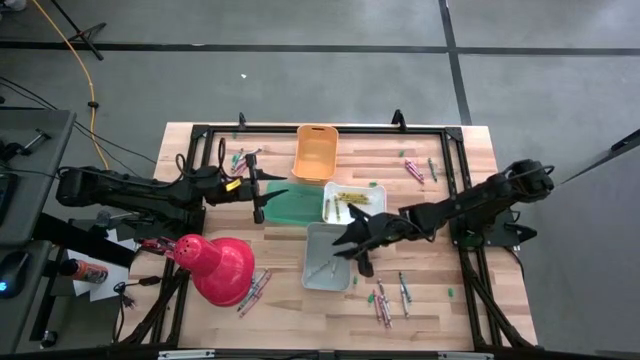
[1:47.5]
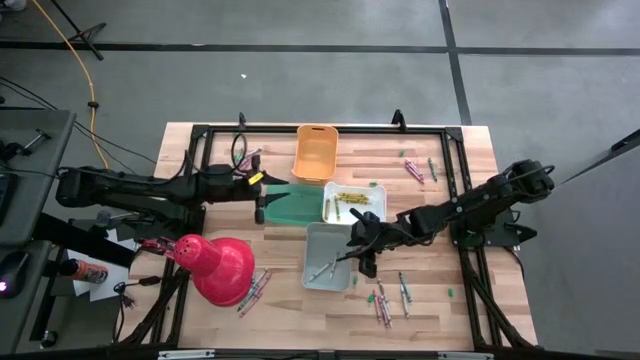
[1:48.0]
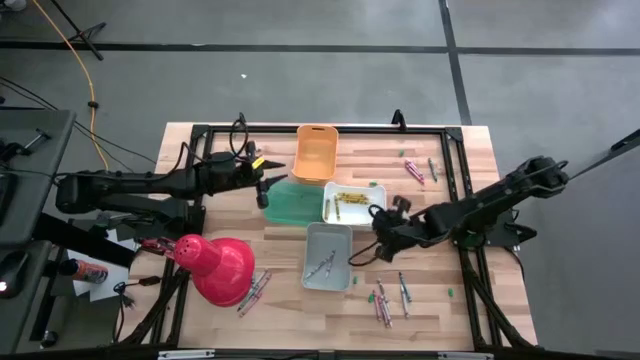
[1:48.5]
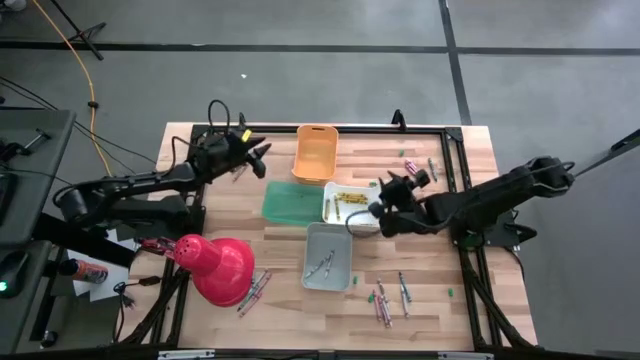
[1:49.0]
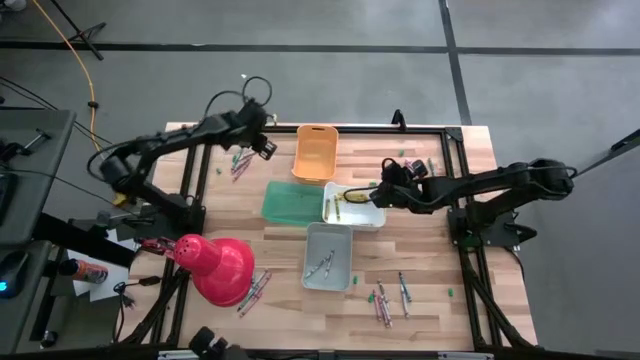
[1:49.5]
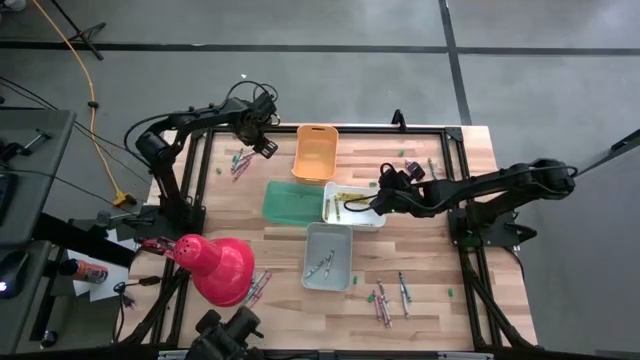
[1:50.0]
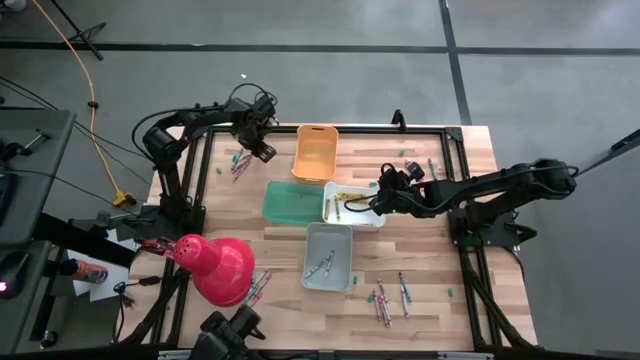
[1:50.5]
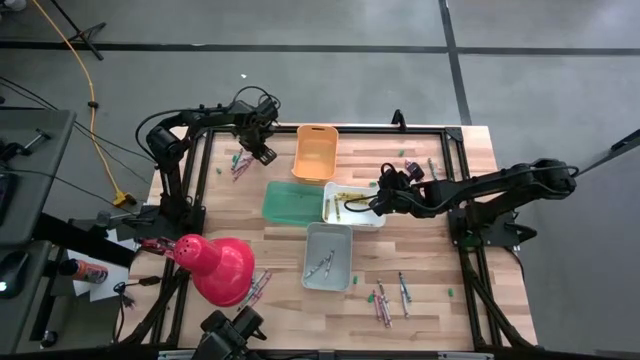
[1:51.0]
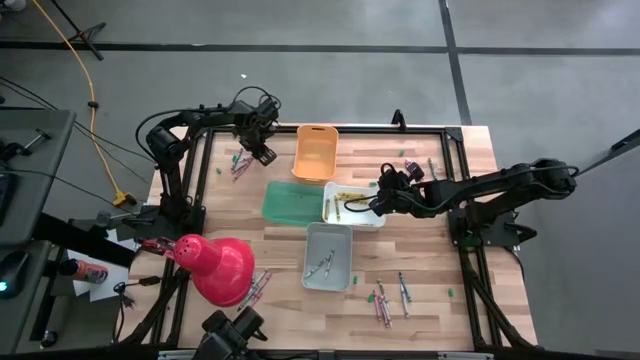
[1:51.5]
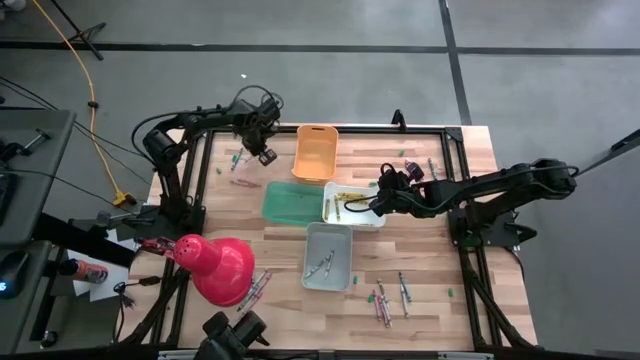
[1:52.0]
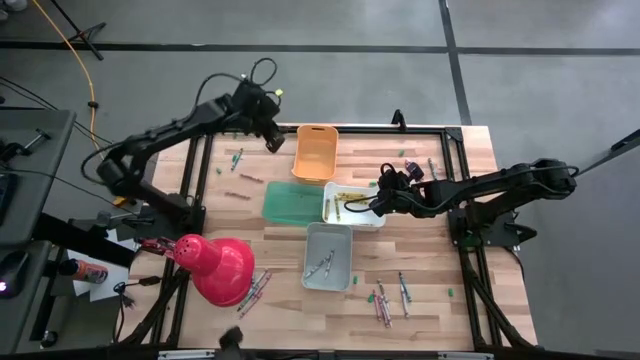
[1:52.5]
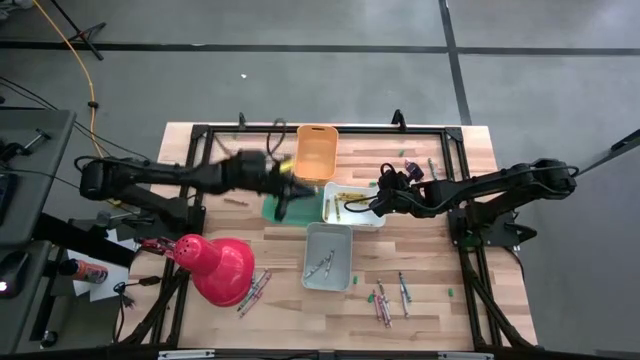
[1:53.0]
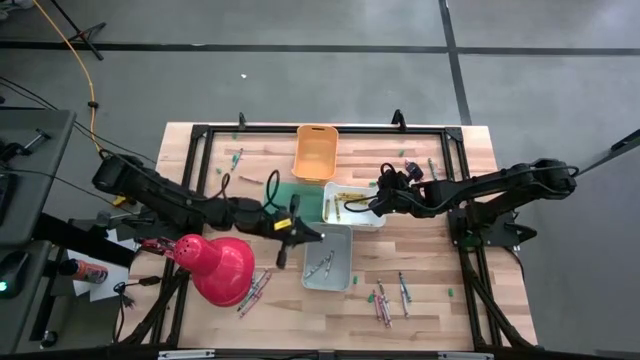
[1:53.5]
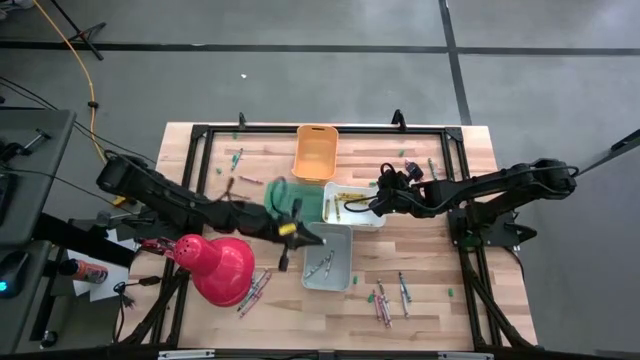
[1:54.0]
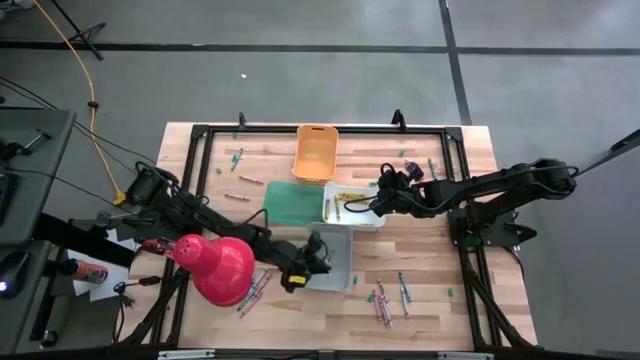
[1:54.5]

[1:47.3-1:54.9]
Task: Sort crayons
Put the white crayon into the gray bin

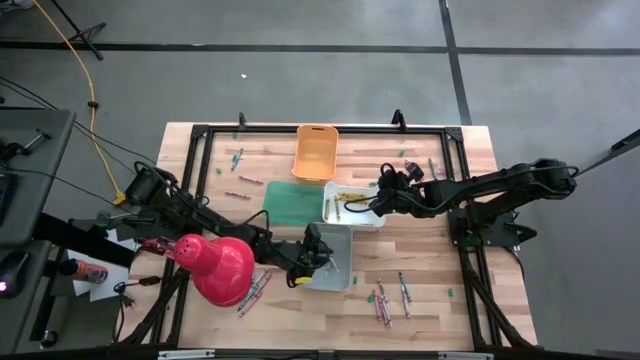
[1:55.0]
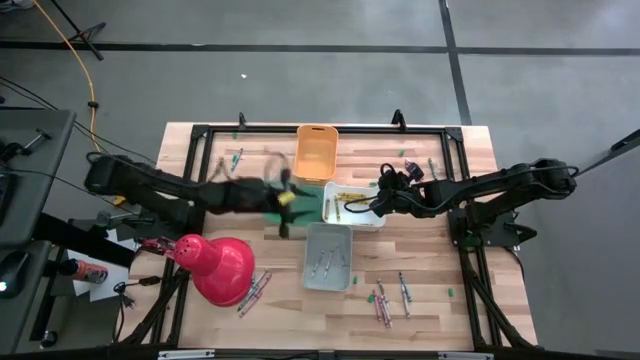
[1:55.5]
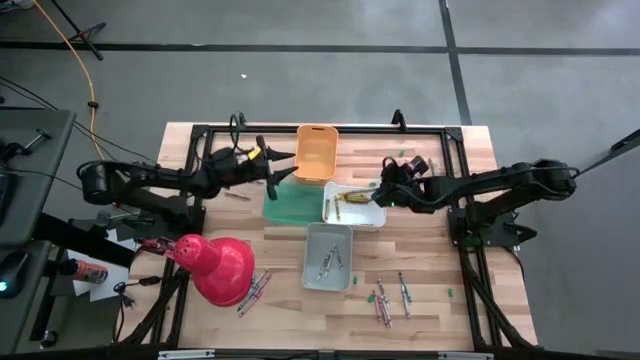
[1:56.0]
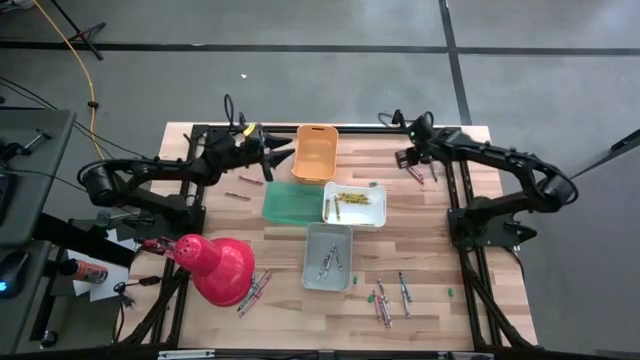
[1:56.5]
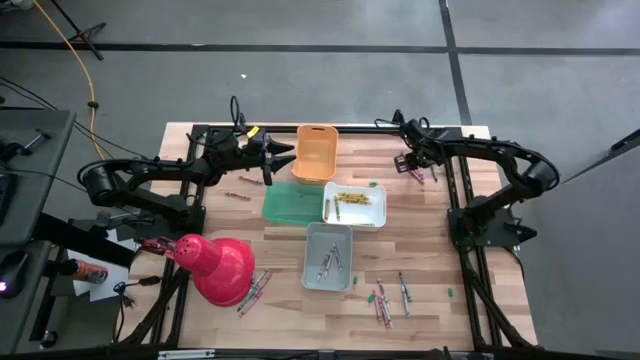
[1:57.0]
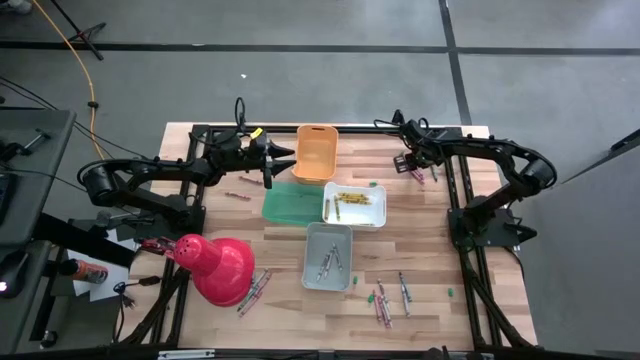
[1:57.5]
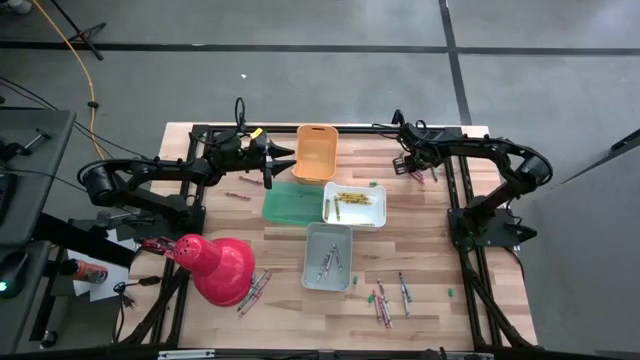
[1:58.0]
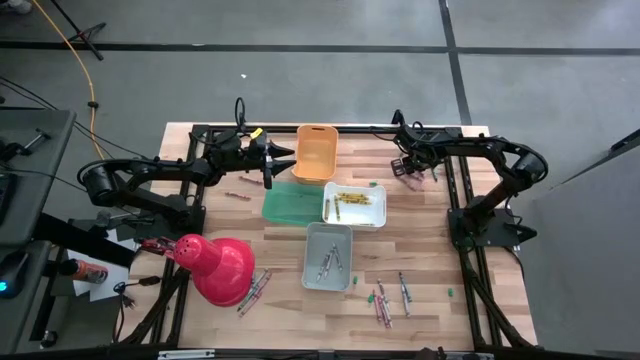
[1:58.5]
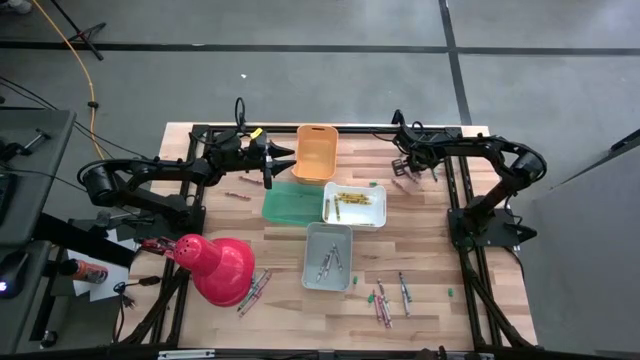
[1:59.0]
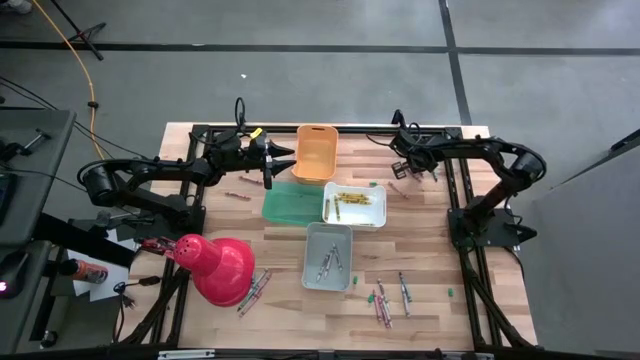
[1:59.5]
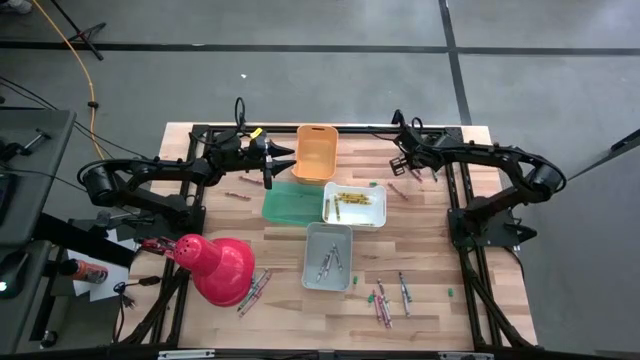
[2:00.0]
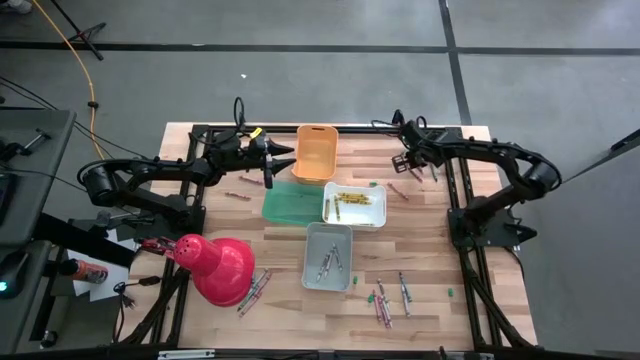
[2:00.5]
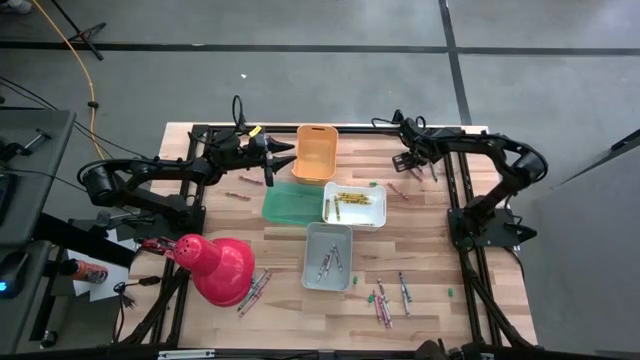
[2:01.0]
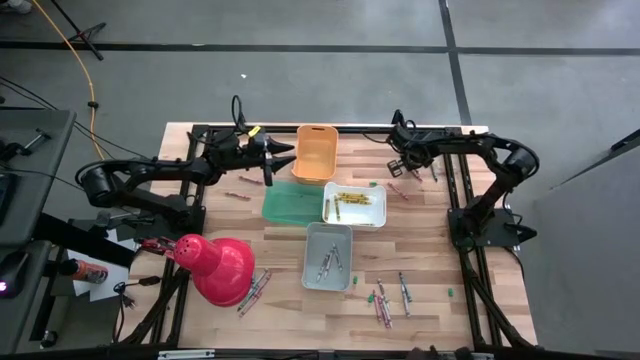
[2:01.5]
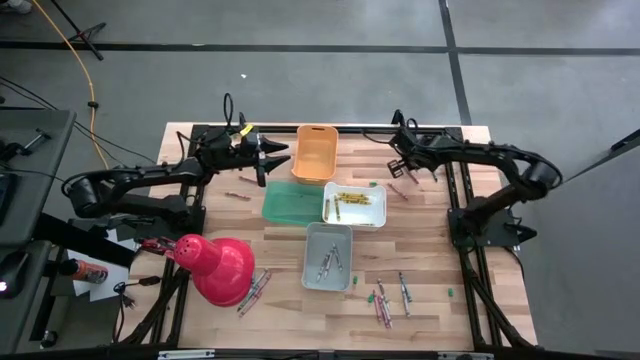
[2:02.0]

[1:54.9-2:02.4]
Put the white crayon into the gray bin

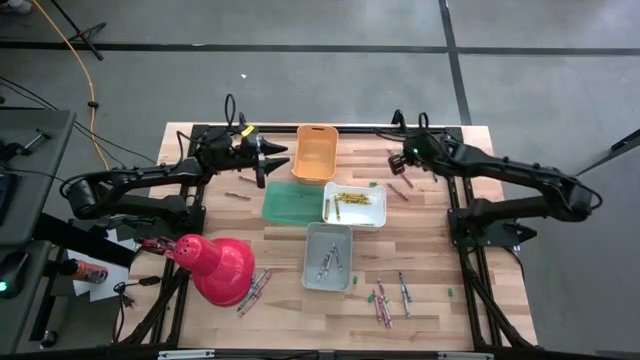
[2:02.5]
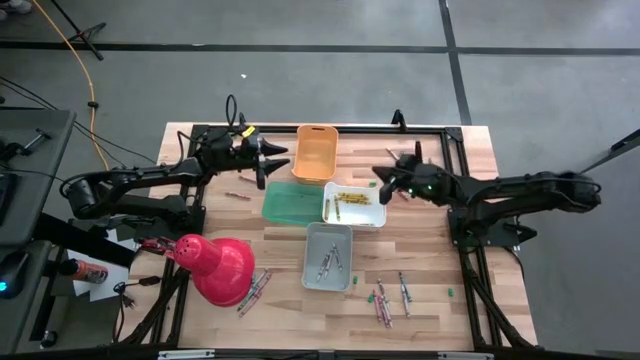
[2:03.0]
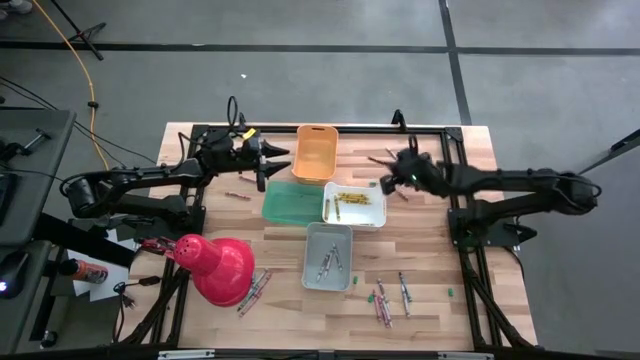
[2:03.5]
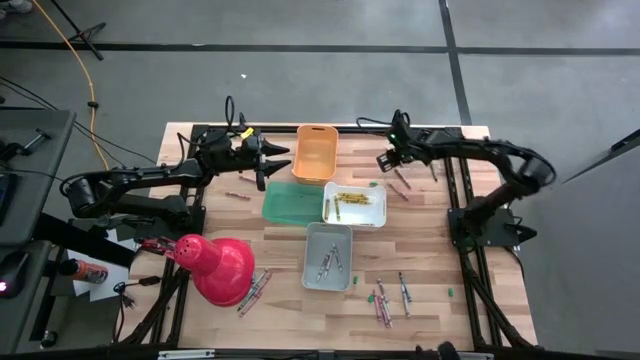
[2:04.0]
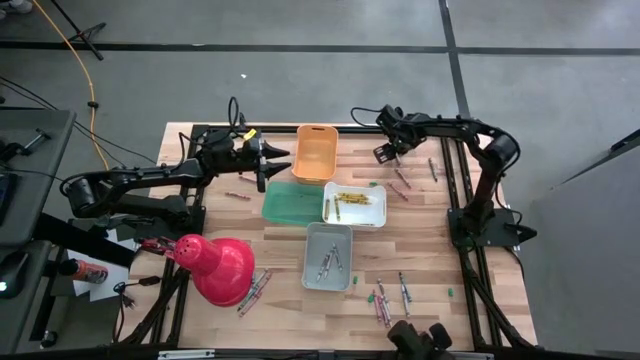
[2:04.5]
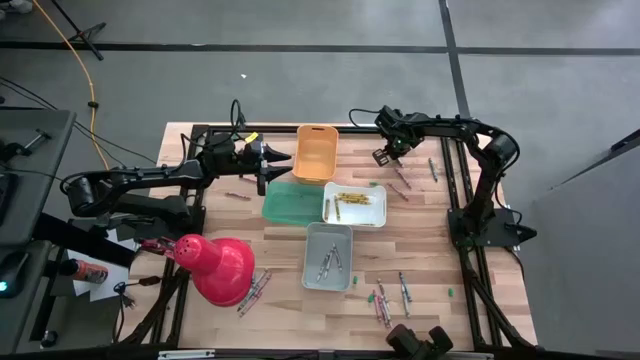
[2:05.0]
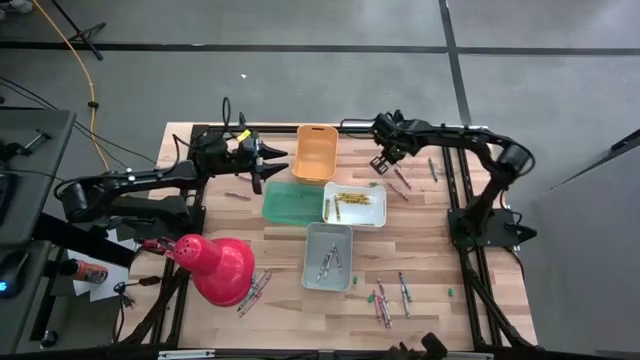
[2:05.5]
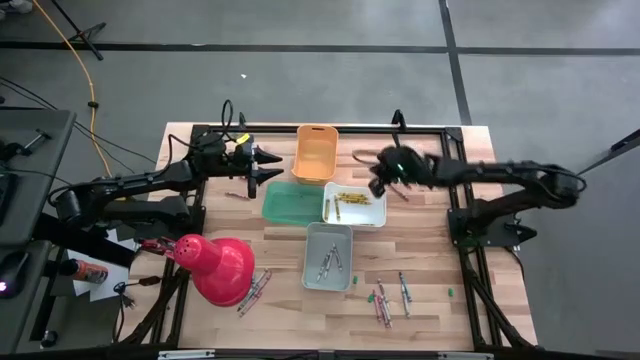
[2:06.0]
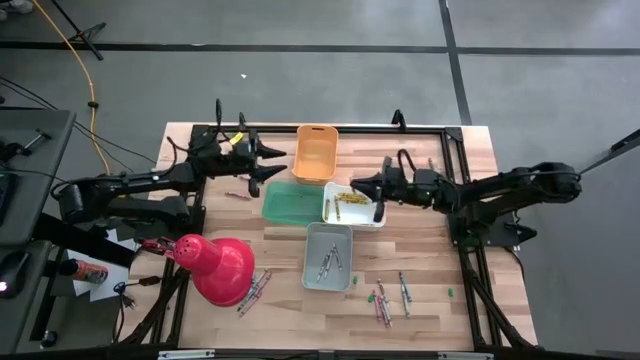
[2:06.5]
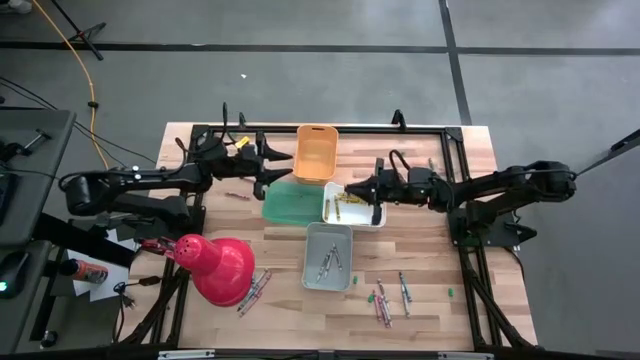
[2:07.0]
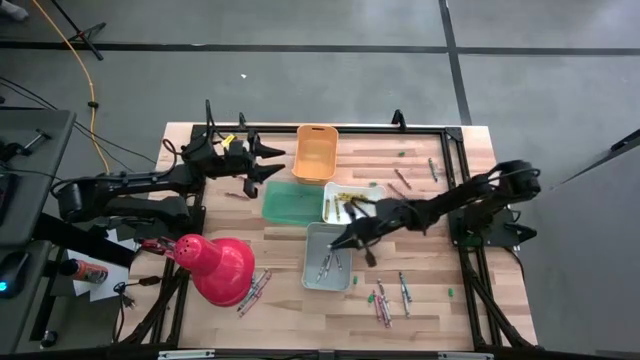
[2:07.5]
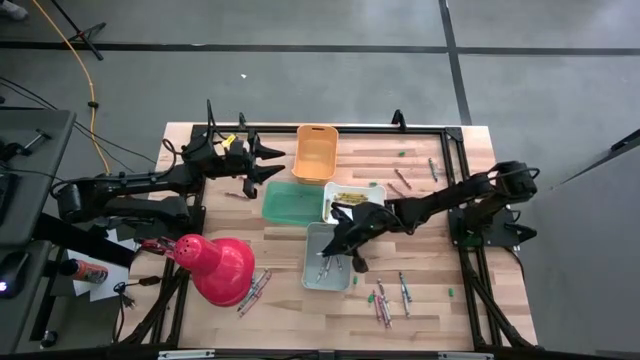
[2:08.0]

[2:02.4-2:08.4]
Put the white crayon into the gray bin

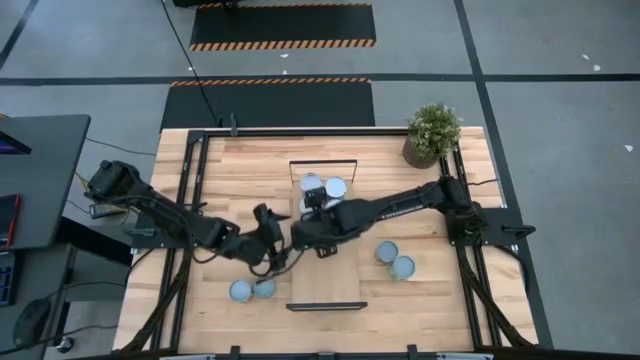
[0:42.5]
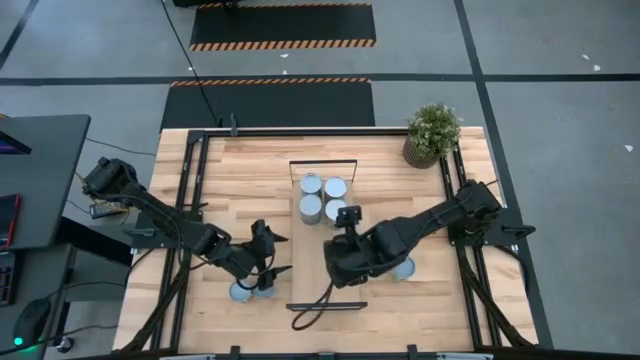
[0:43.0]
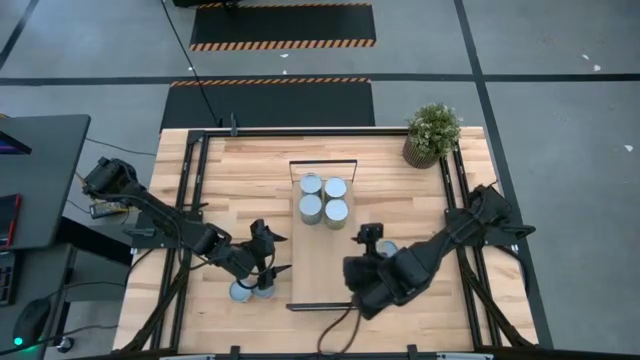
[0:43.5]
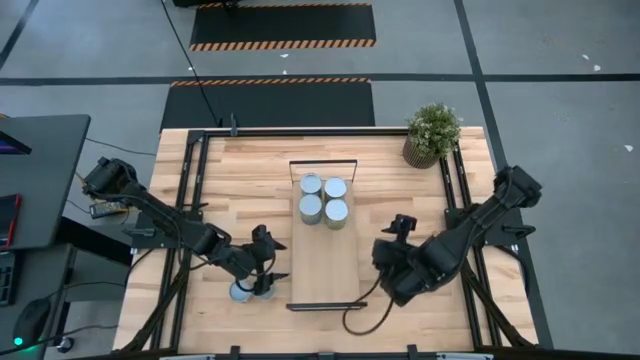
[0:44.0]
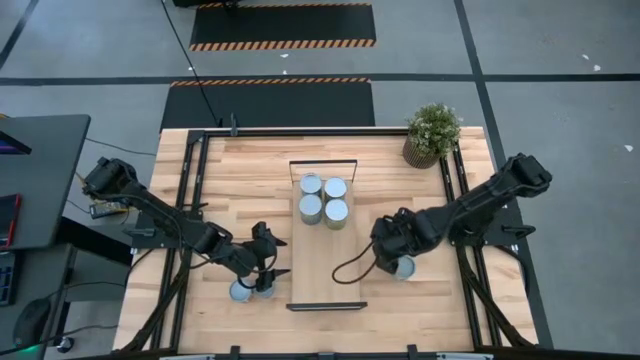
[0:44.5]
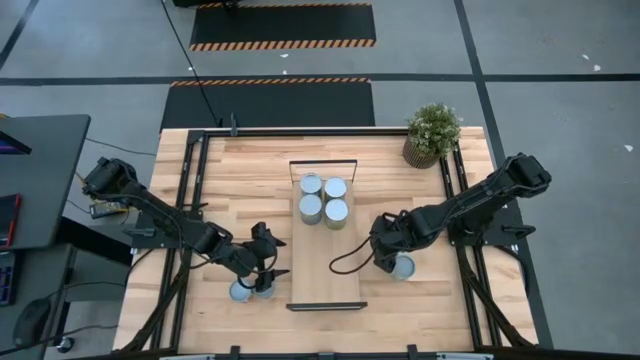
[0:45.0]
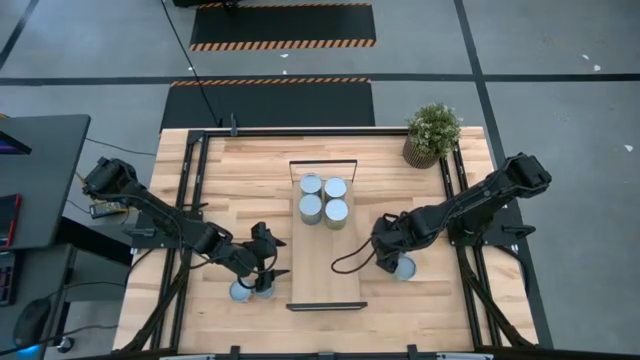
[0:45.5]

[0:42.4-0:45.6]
Task: Pick and place cans onto a shelf
Put the canned green peas on the shelf
